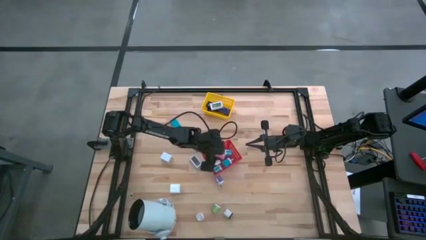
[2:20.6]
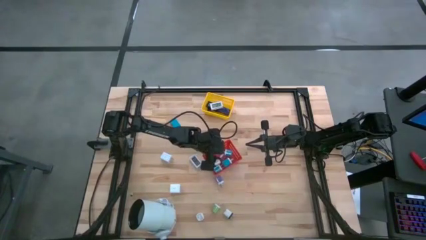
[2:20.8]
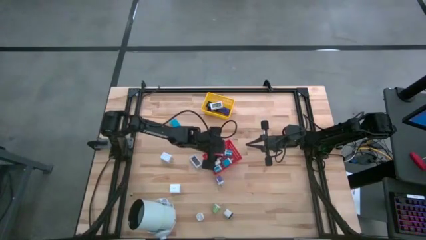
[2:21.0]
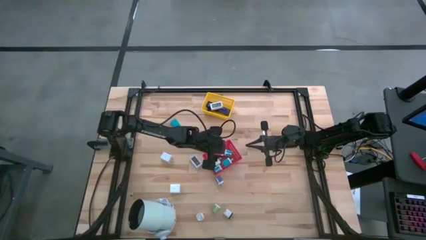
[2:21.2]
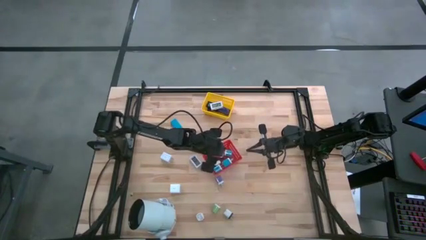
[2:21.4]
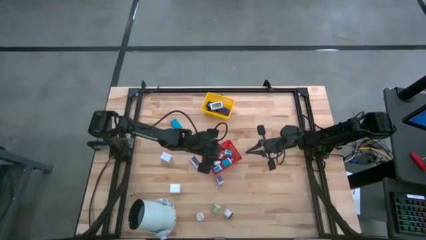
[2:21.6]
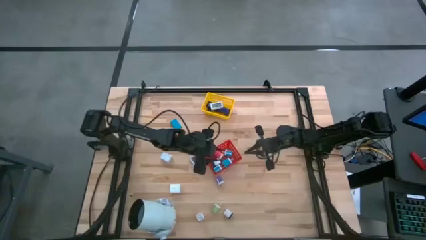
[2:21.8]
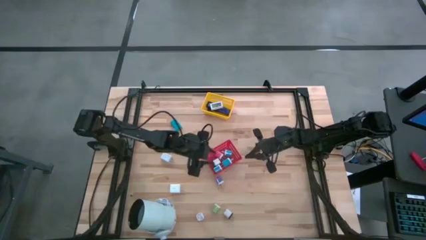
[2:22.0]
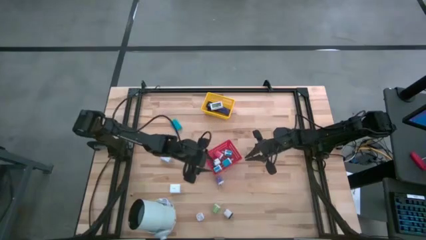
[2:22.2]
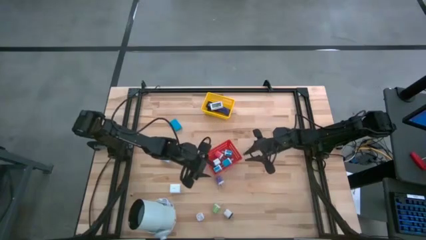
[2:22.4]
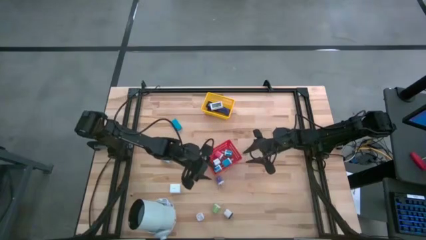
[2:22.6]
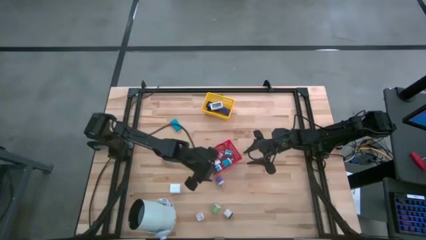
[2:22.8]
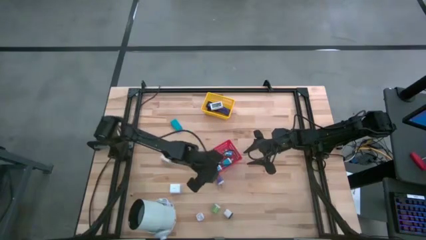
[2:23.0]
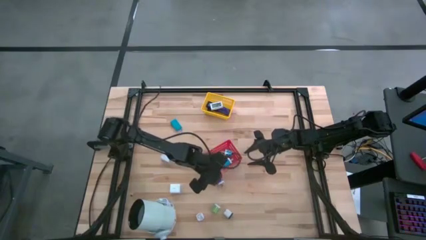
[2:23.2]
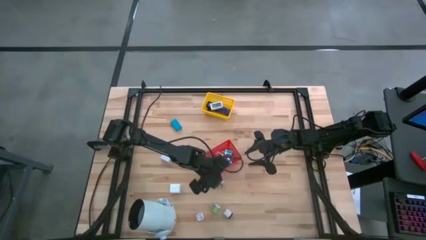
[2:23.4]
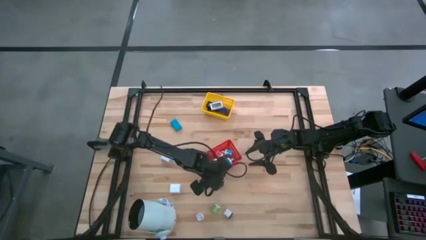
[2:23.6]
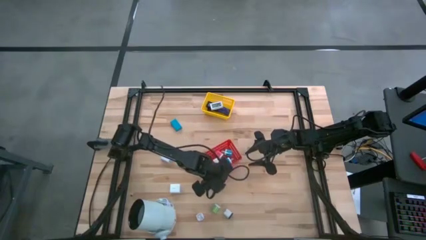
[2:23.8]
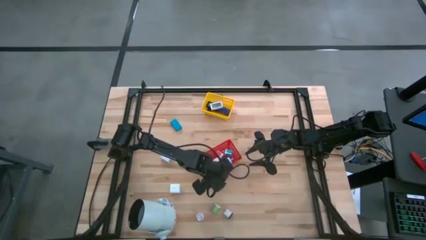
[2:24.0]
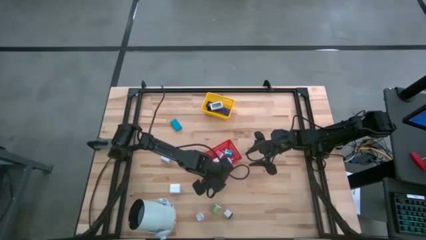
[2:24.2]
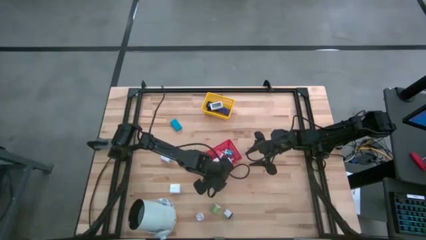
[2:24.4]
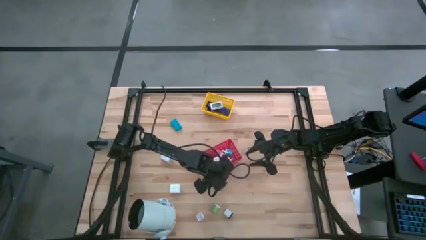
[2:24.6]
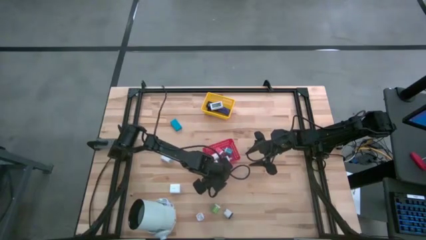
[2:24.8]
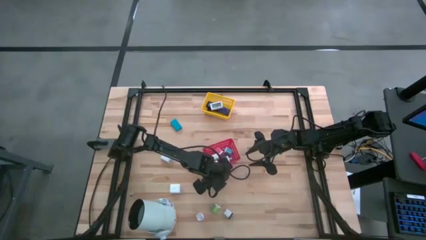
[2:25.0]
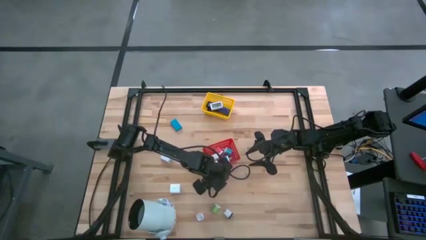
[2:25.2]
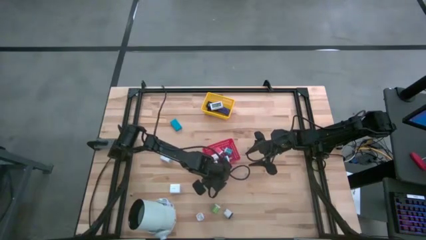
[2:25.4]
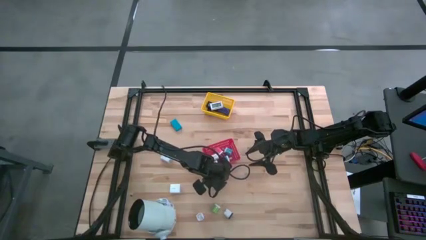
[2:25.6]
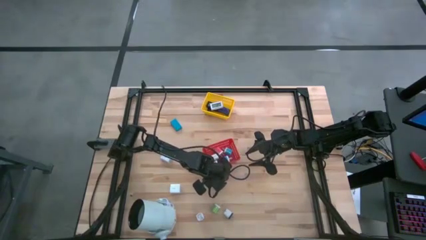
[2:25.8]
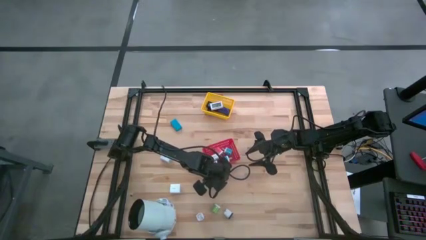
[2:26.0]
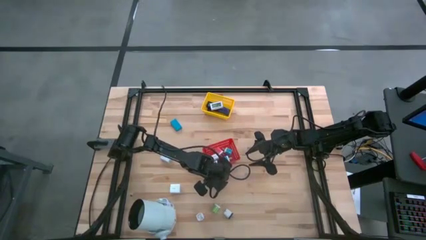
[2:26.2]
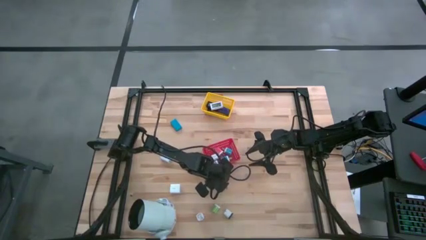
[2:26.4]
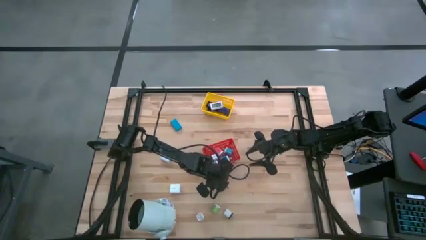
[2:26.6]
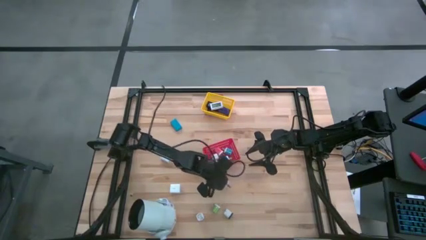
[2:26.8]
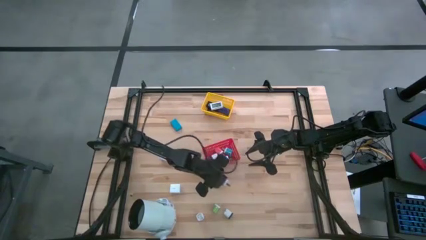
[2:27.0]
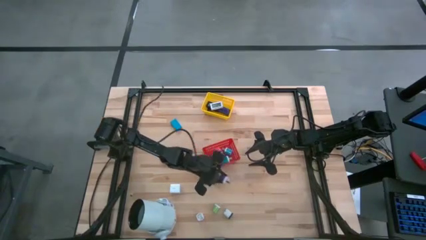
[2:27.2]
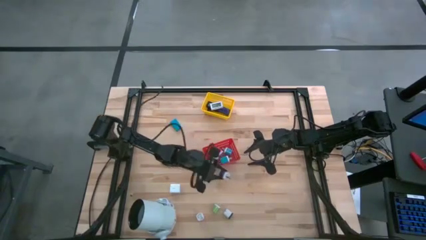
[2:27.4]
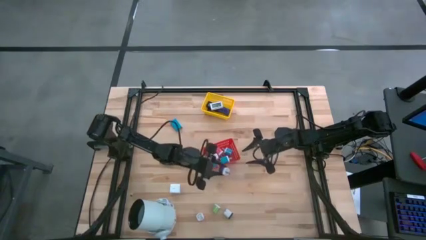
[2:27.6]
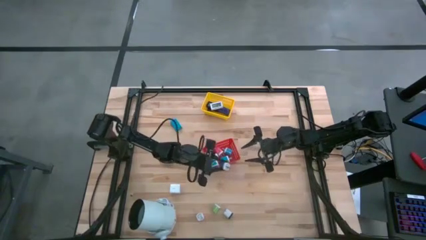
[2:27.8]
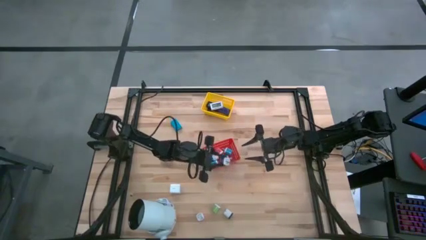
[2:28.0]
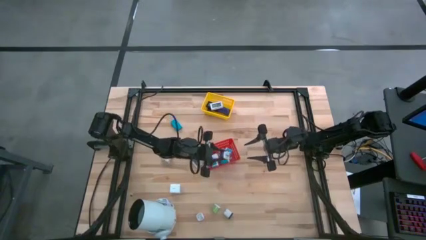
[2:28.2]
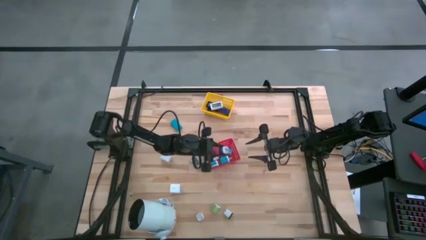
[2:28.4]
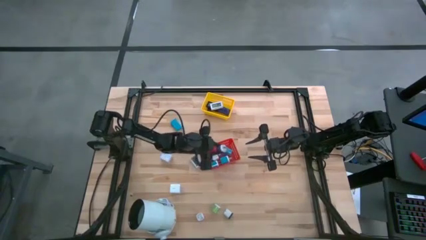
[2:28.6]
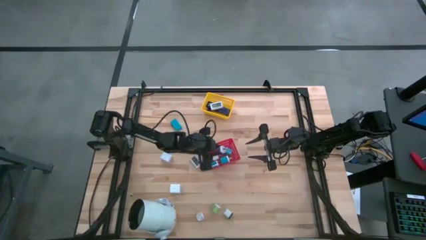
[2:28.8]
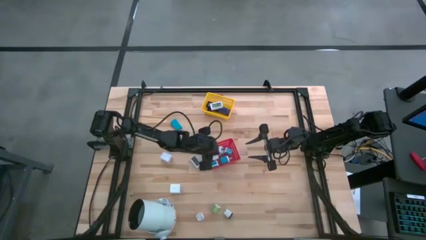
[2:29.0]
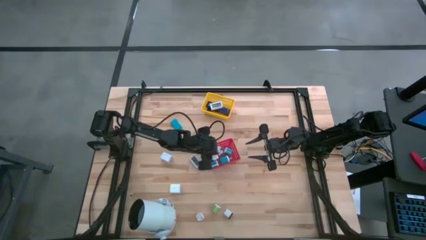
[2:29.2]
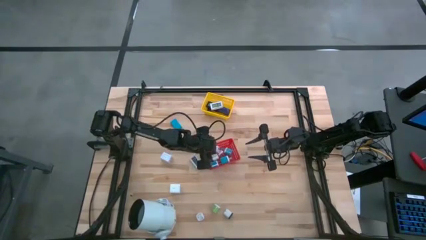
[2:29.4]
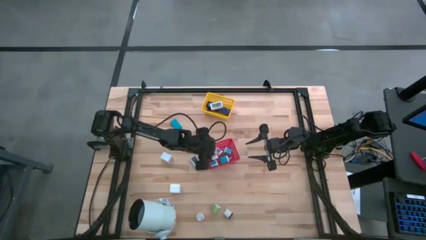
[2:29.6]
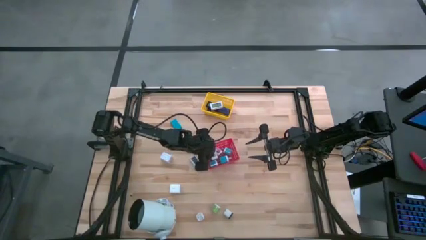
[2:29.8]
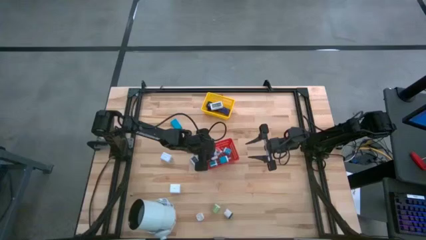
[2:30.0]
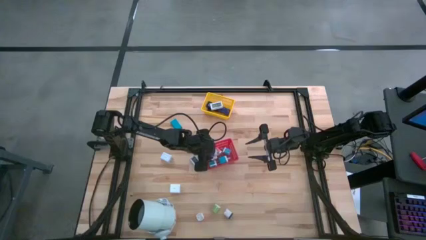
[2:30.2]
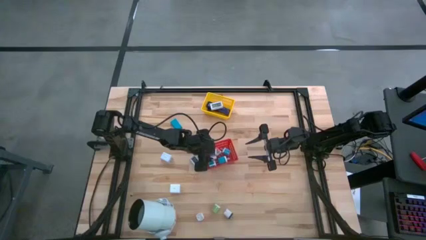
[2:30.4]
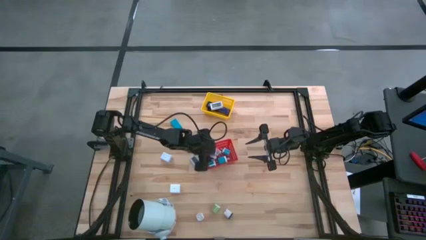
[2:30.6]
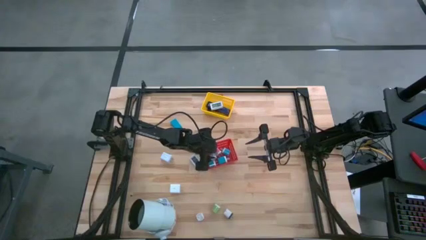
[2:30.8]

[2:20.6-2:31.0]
Task: Pick & Place Office items
Put the violet charger adapter into the red bin

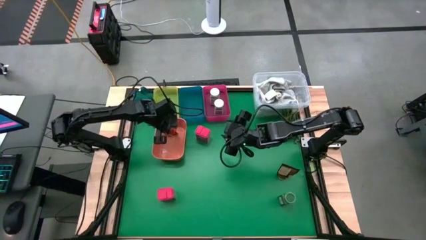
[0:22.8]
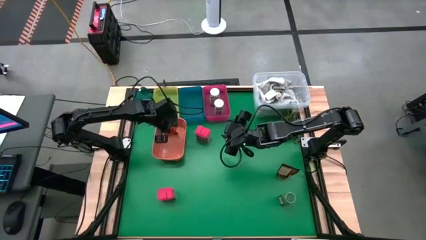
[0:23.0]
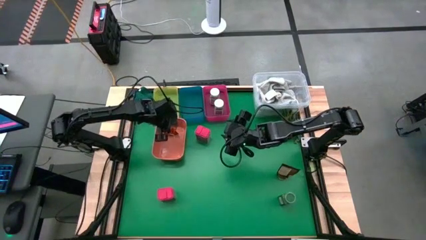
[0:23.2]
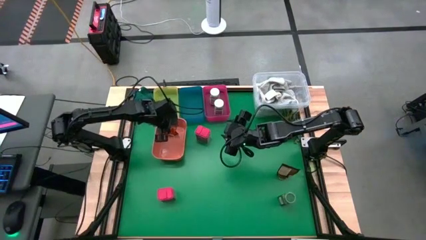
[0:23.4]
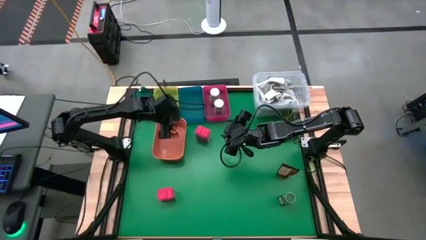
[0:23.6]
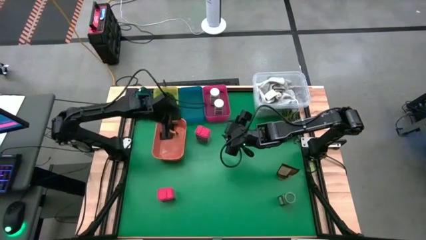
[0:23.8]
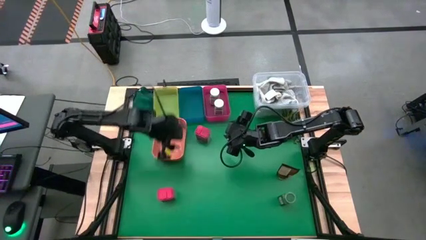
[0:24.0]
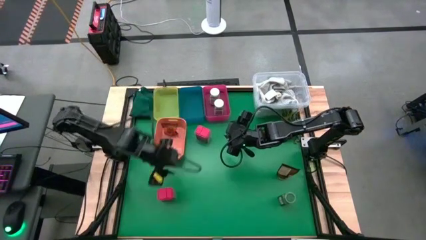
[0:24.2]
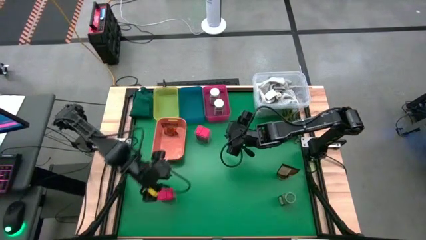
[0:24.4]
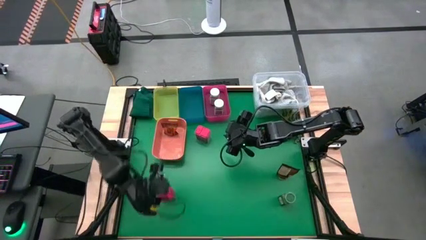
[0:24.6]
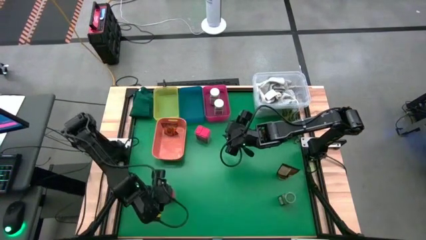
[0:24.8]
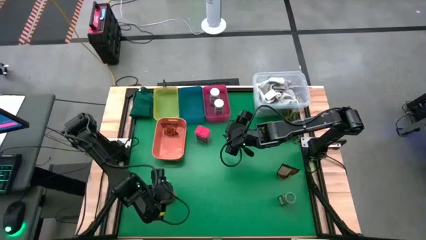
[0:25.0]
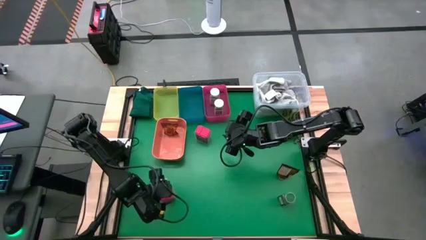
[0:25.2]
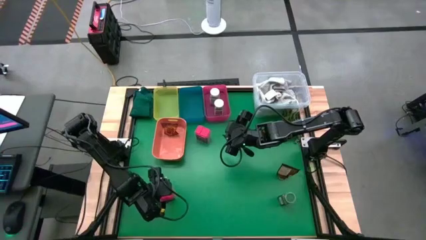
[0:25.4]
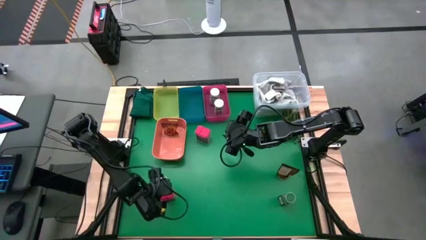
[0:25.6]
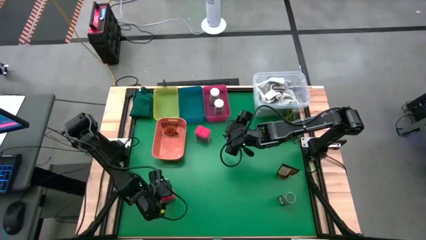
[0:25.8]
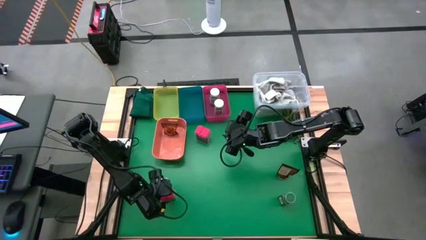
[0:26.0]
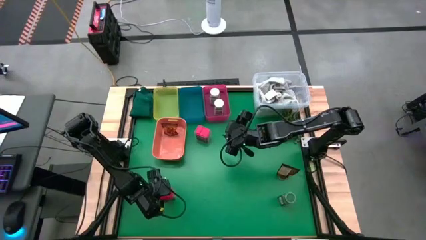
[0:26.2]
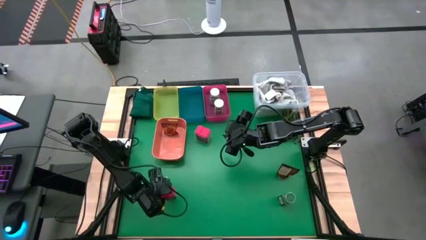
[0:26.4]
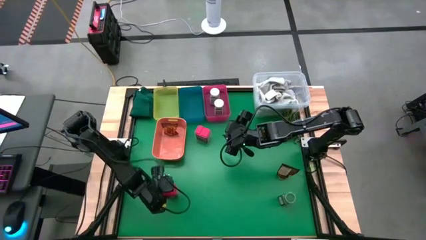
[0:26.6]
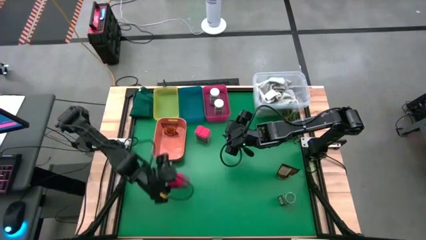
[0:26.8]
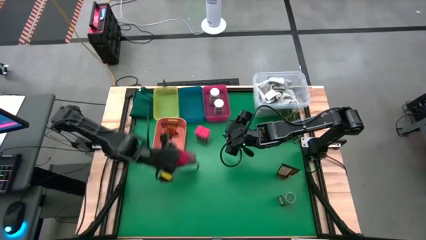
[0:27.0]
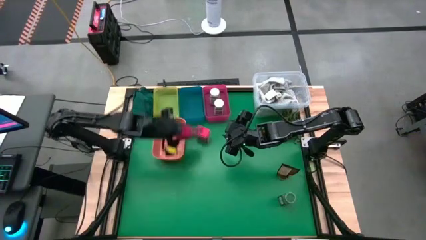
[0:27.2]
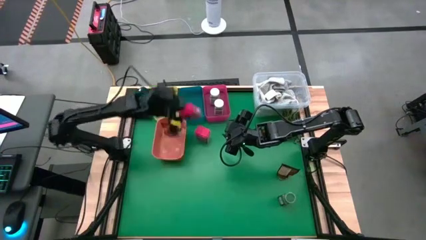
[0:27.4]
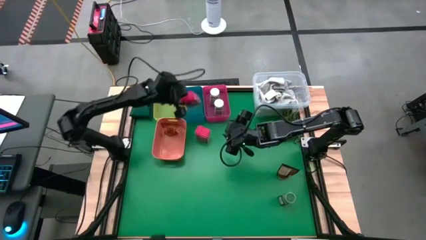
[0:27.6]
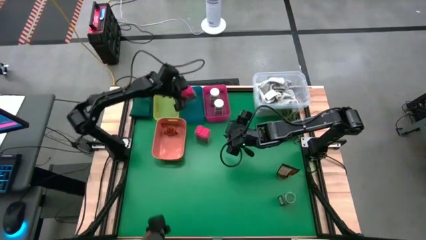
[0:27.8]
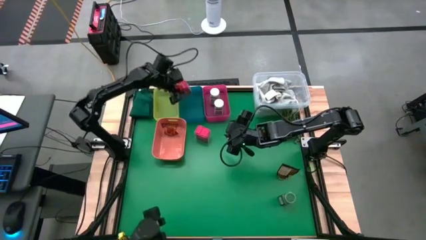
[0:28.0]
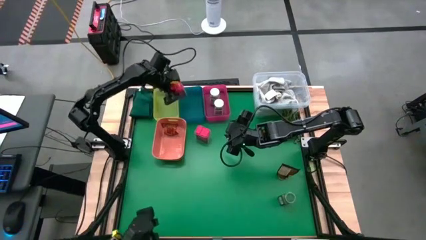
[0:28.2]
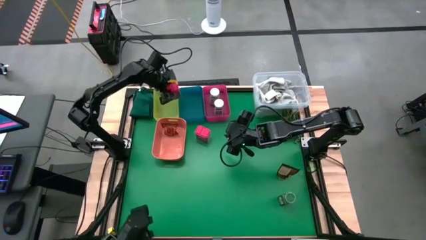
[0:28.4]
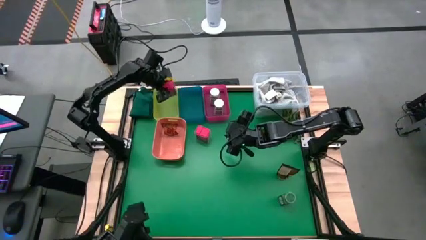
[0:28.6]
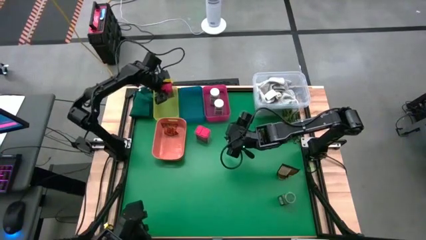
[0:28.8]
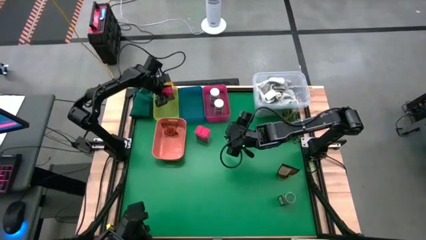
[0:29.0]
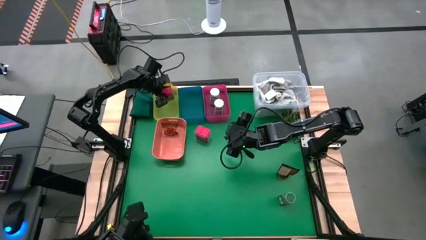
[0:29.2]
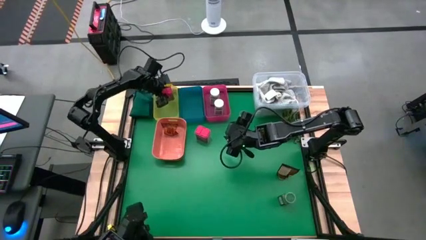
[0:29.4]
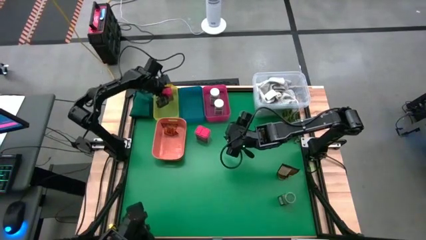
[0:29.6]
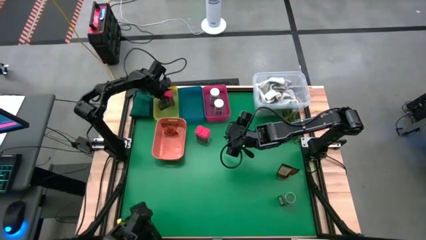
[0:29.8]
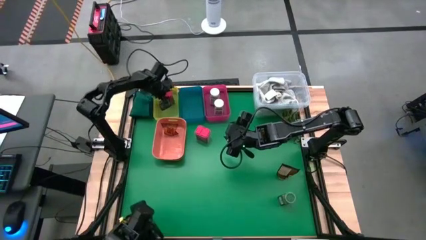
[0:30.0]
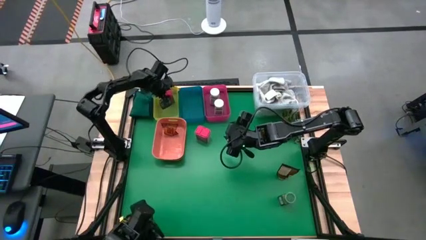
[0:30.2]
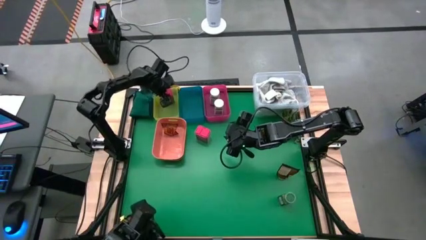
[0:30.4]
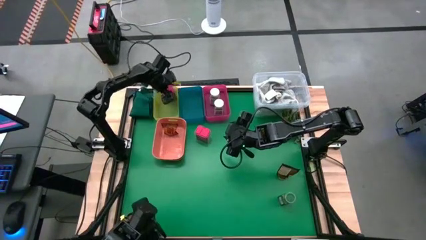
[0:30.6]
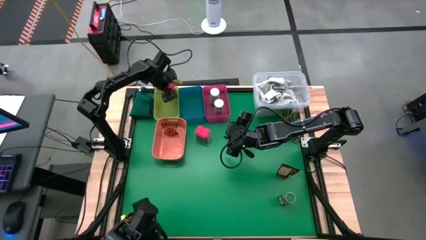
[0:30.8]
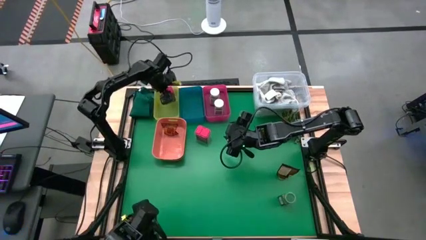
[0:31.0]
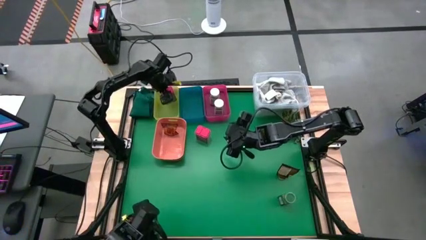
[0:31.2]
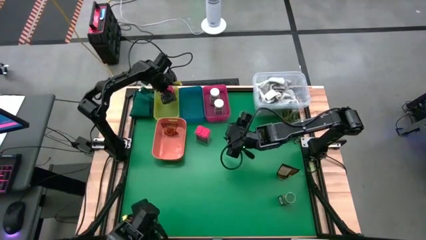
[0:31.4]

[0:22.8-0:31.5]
Task: Sort spices by type
Put the bottom red seasoning can into the yellow bin
